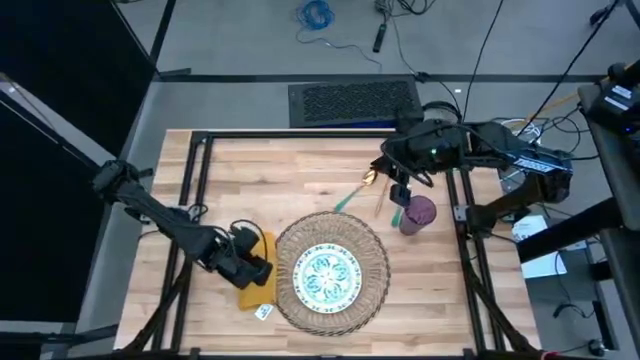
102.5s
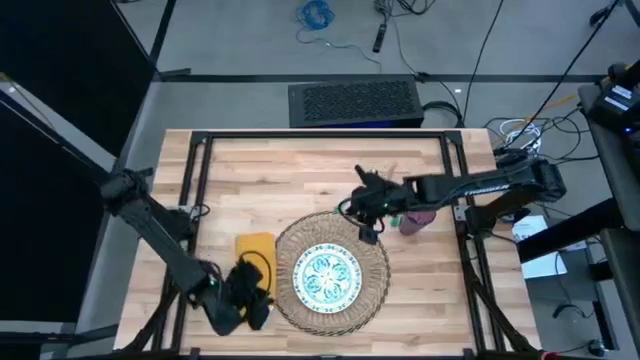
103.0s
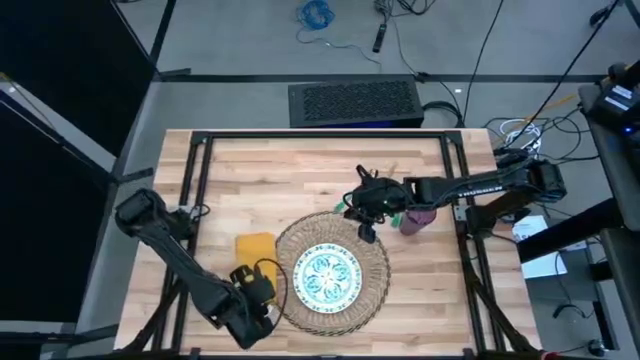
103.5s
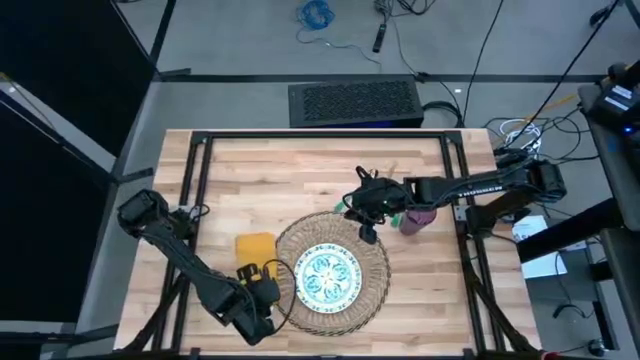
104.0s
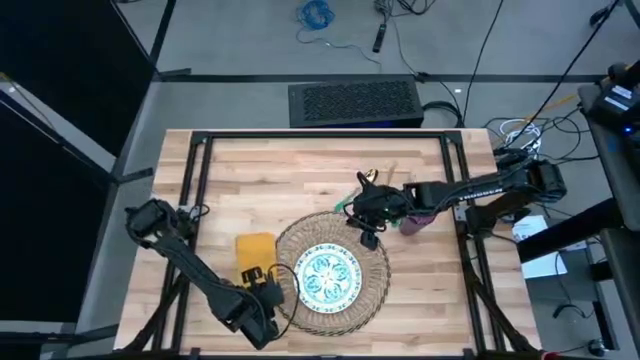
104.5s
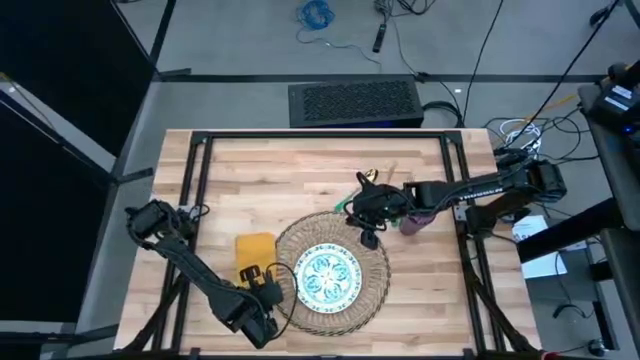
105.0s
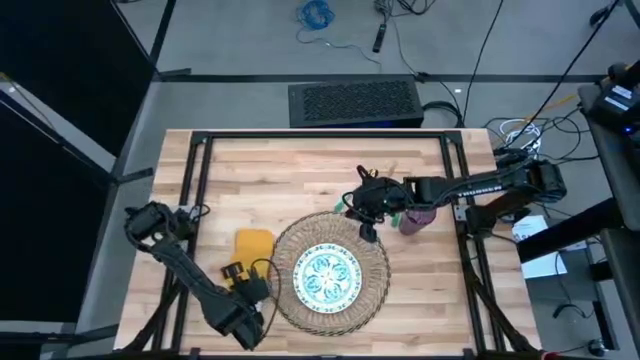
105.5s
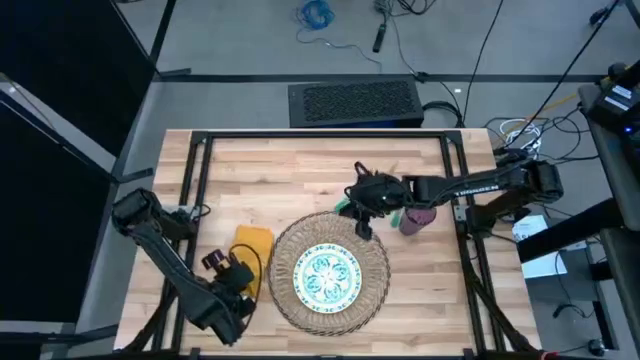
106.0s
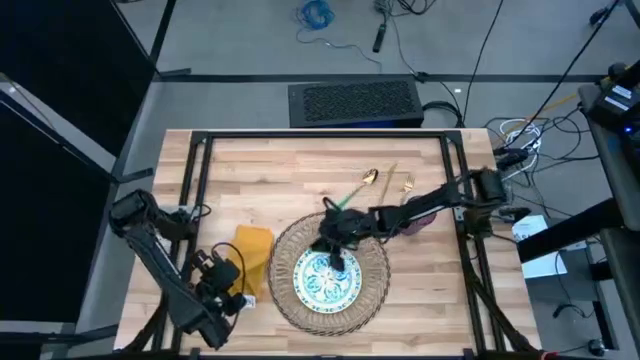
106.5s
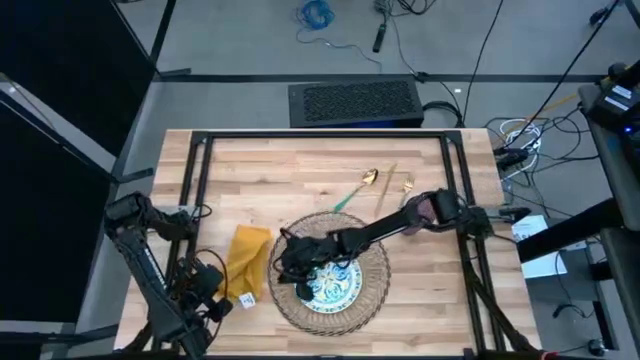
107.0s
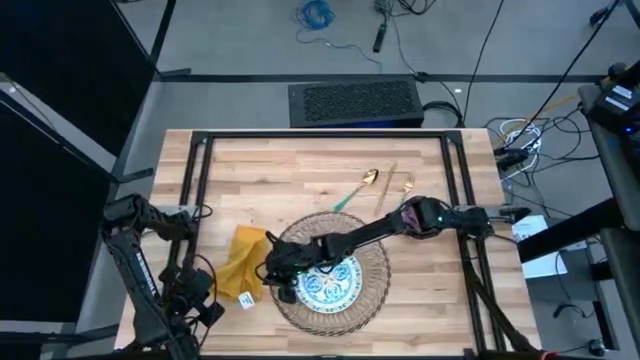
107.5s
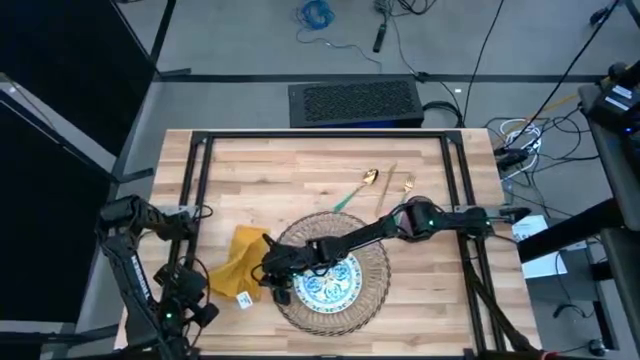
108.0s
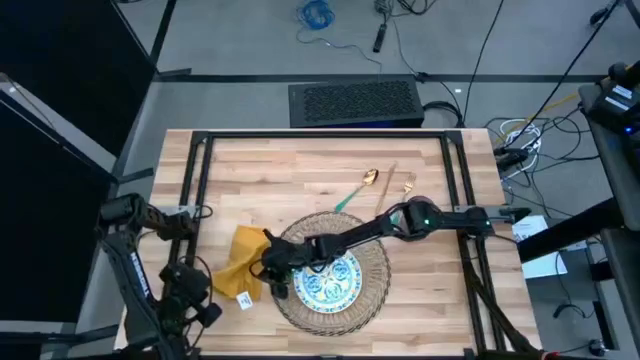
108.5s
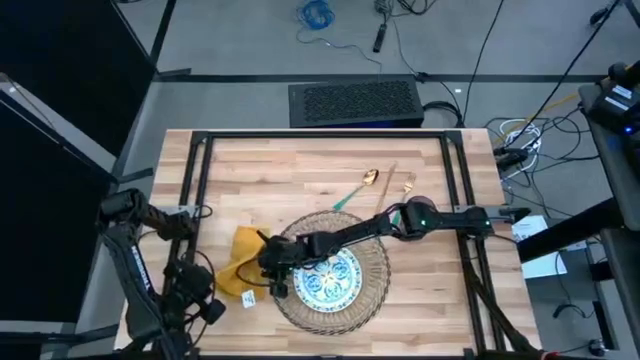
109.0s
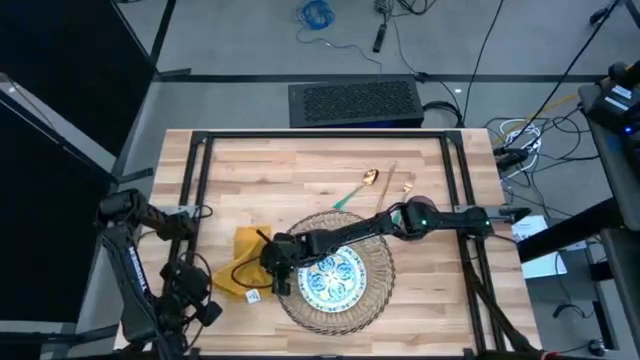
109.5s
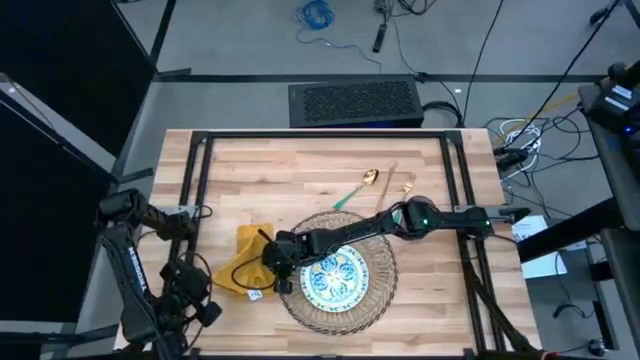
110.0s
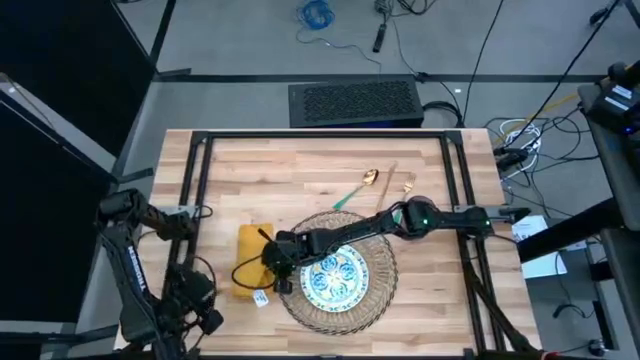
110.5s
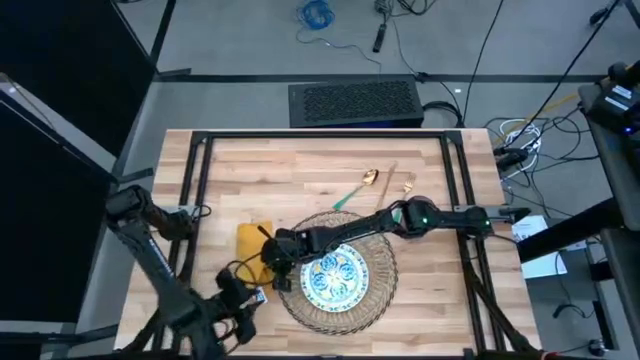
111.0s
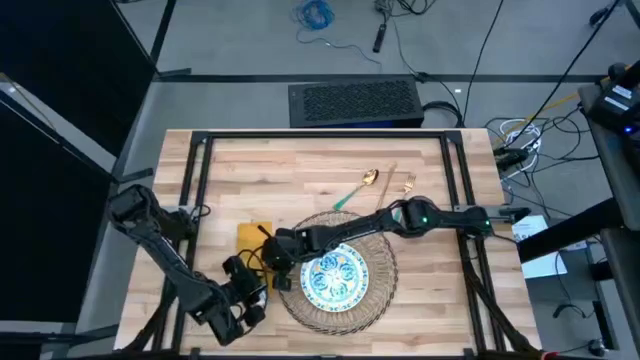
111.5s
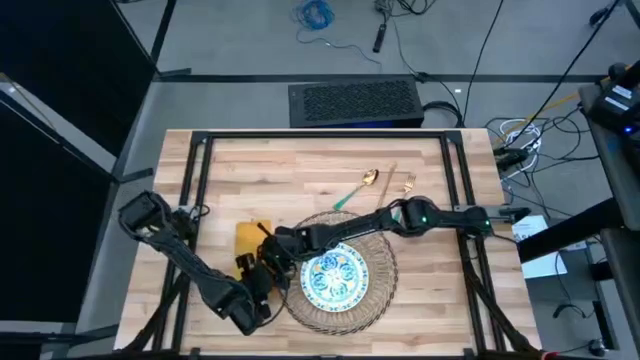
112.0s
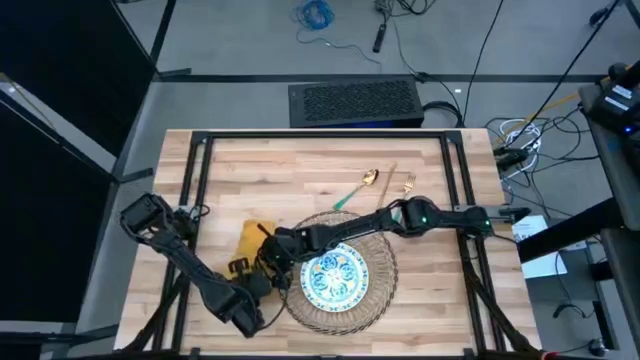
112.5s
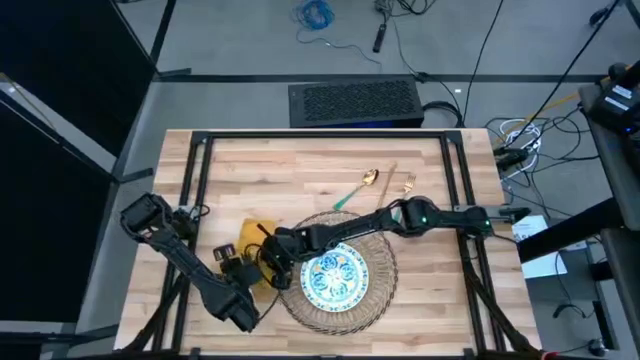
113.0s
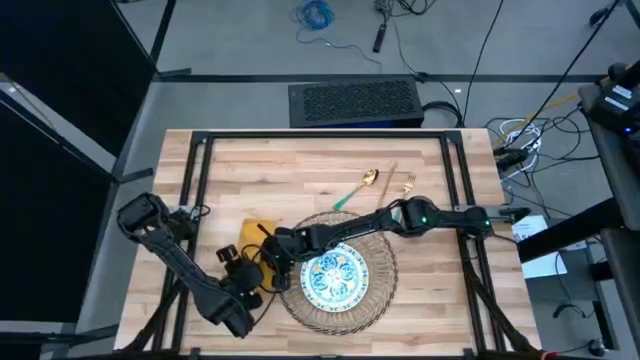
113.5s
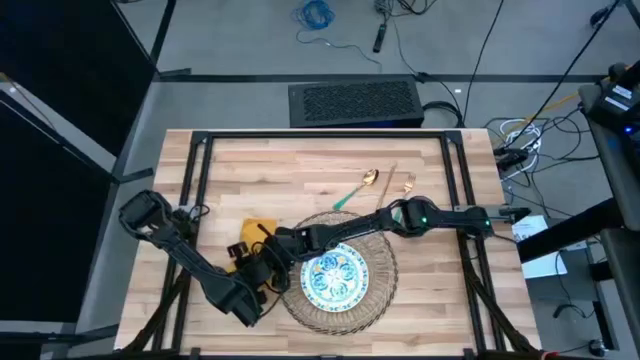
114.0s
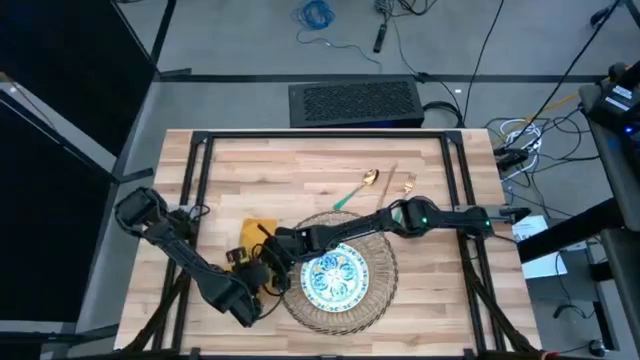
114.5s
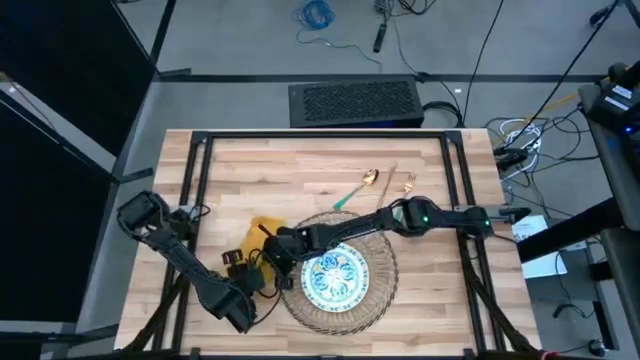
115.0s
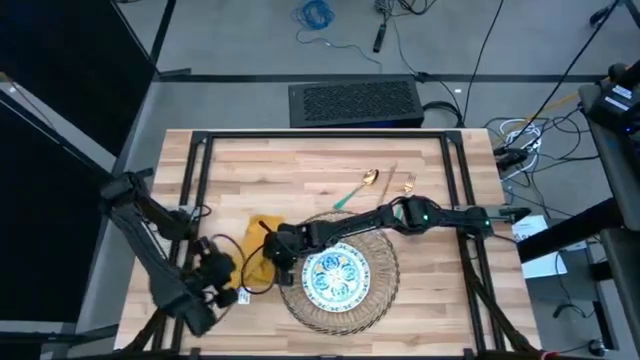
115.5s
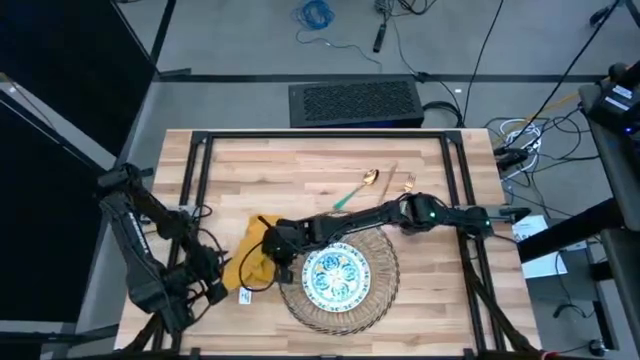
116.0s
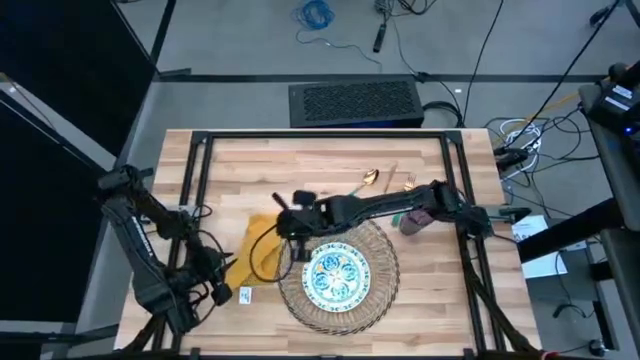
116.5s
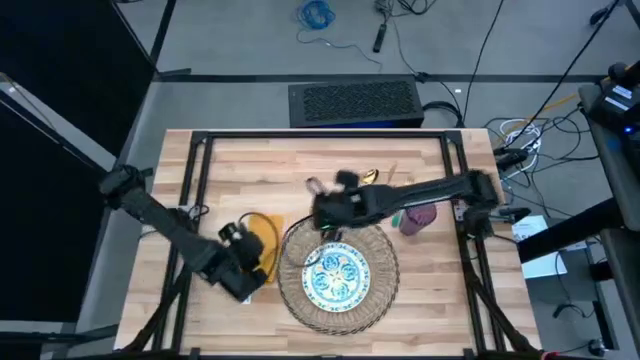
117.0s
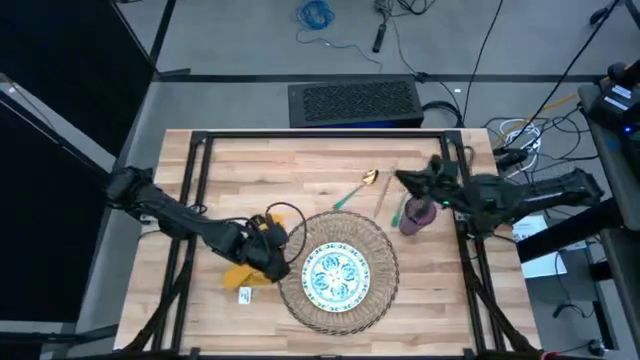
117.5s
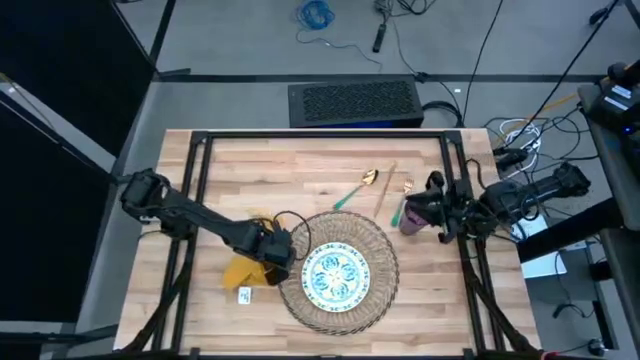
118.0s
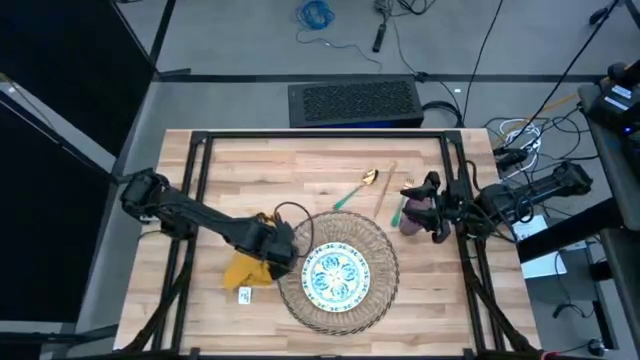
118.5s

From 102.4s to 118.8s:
Task: Set table place
Adjust the folded yellow table napkin
